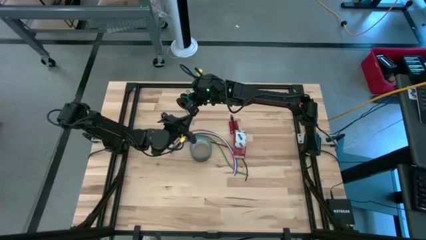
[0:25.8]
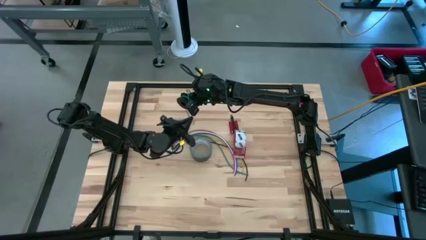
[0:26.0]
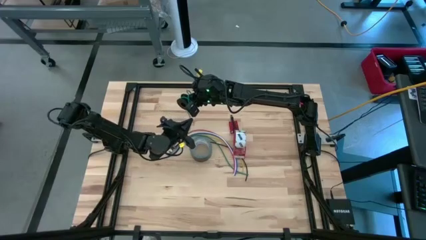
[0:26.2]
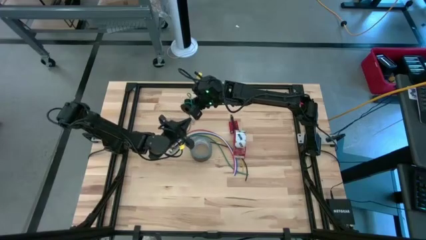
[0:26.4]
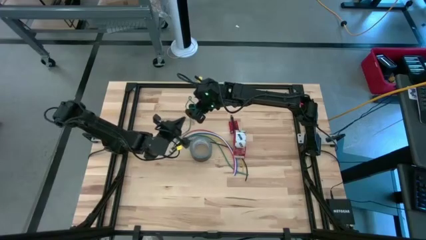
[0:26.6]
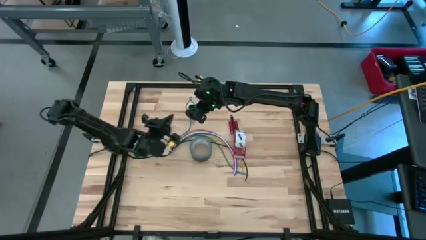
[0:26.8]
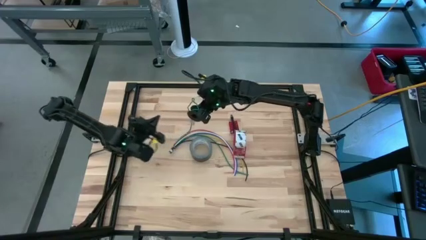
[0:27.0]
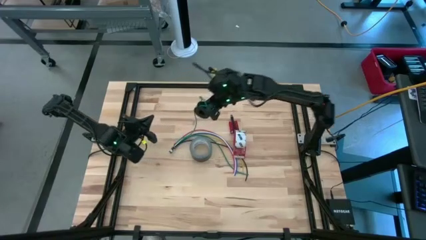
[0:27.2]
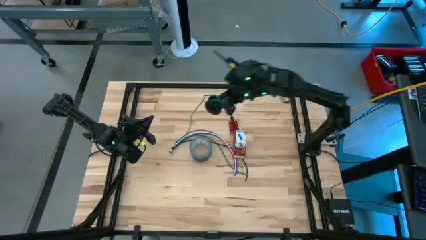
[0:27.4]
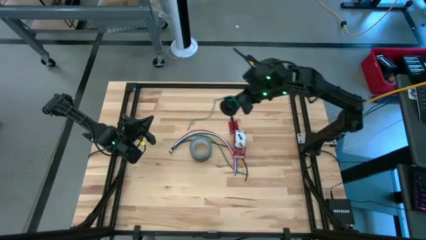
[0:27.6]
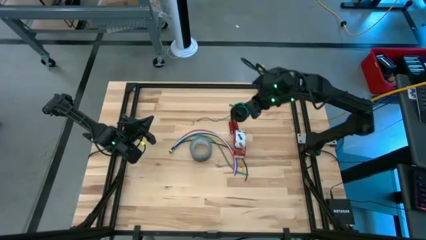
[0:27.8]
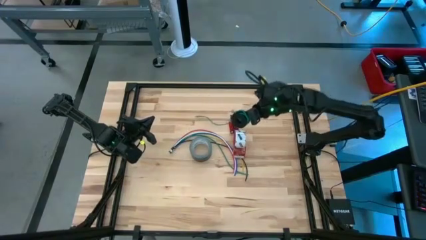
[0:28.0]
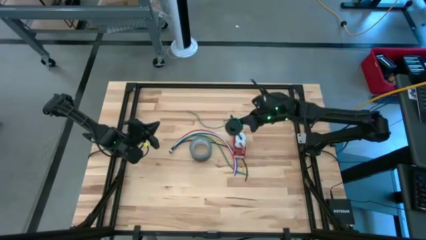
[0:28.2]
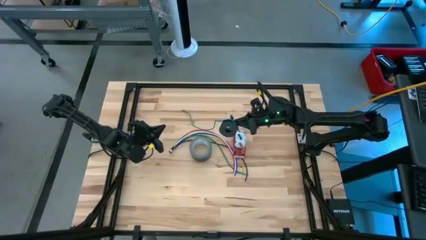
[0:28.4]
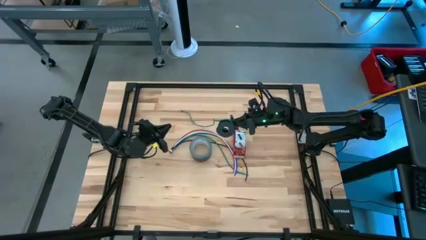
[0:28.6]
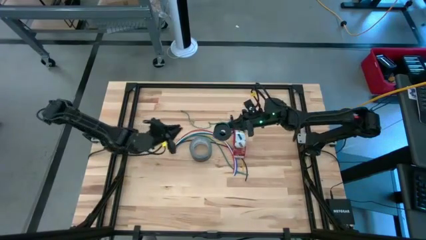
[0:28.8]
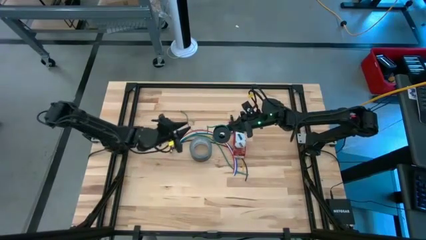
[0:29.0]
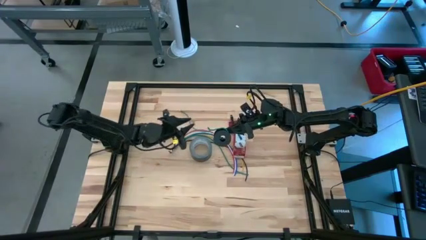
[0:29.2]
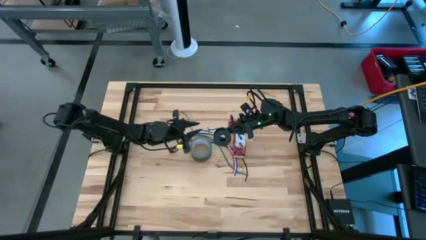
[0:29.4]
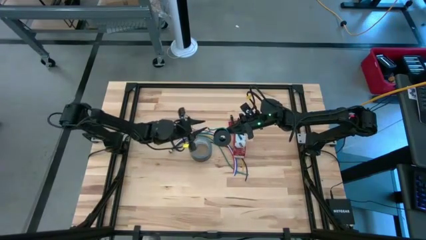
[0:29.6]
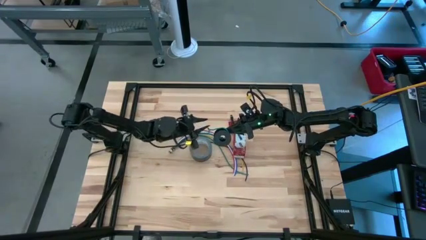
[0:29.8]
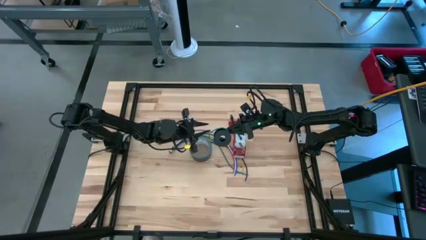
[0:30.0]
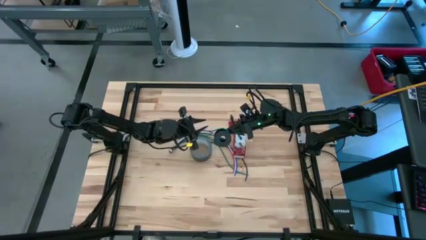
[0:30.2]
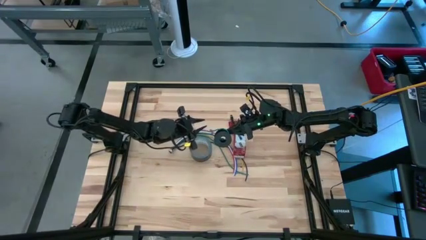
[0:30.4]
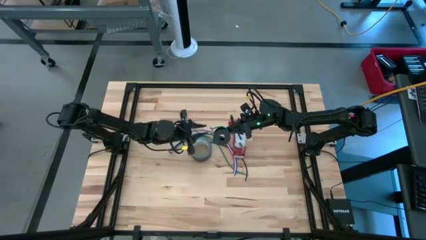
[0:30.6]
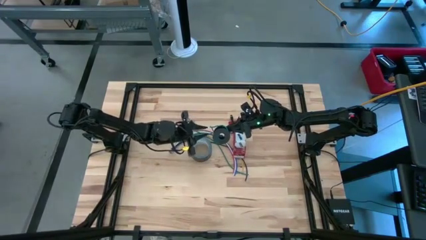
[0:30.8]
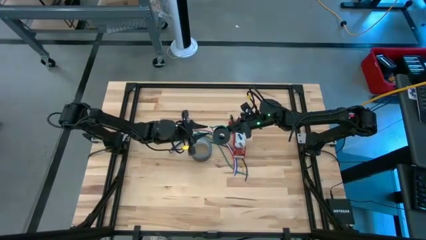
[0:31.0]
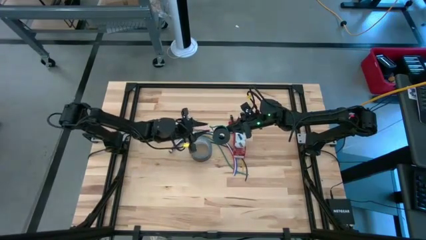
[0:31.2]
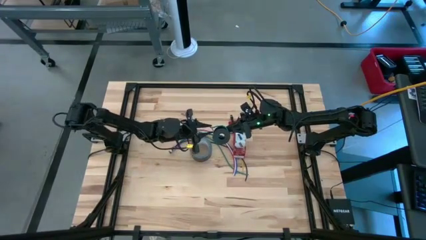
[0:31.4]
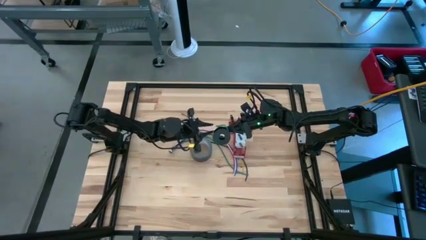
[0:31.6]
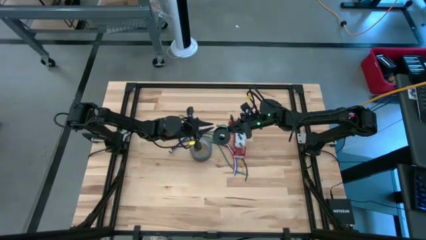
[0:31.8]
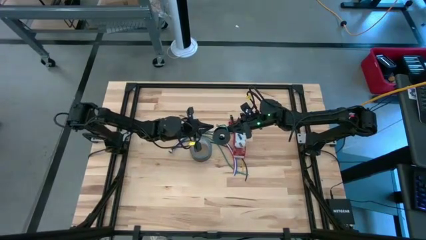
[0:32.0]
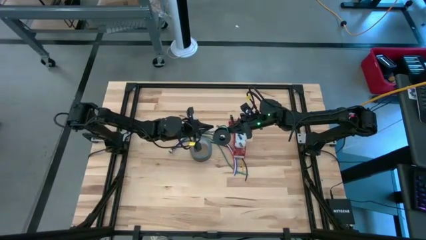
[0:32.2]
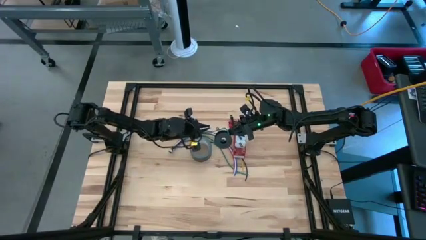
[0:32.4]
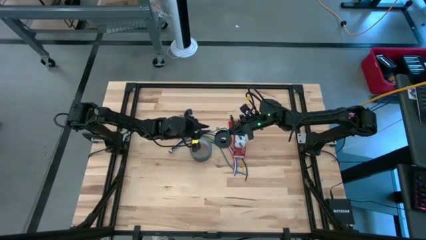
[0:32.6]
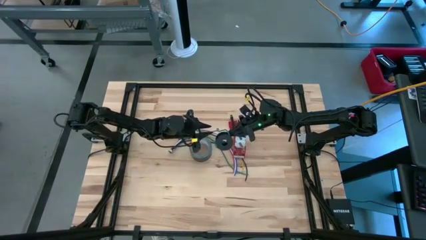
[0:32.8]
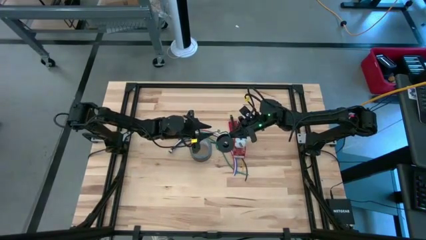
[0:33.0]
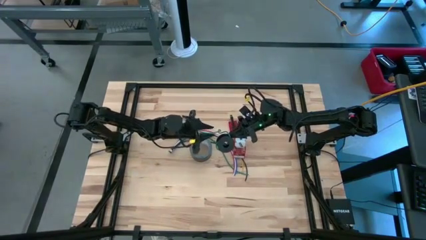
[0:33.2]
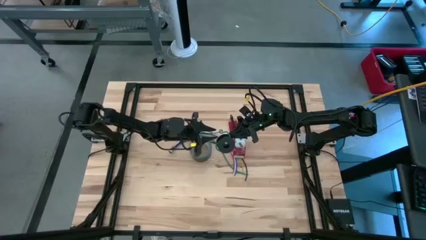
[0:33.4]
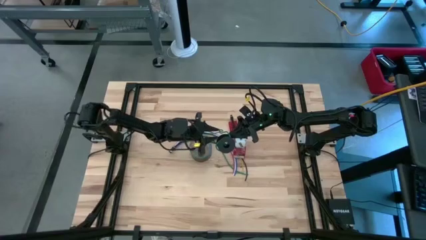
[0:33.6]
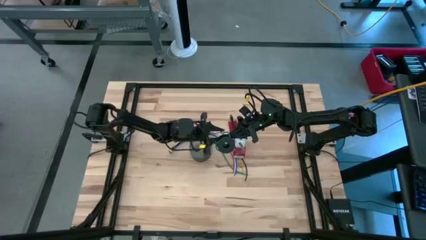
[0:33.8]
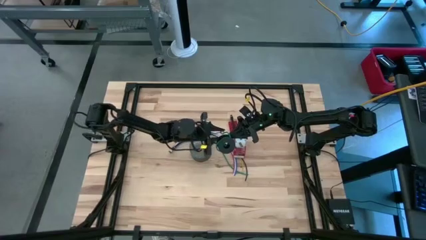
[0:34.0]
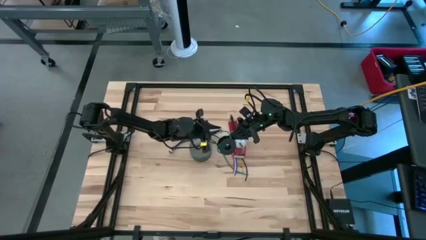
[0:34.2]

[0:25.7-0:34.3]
Task: Coil cords
Uncoil the green wire from the black spool

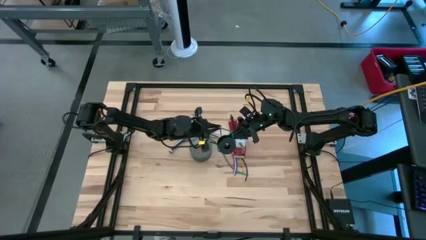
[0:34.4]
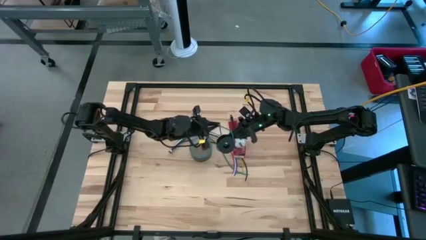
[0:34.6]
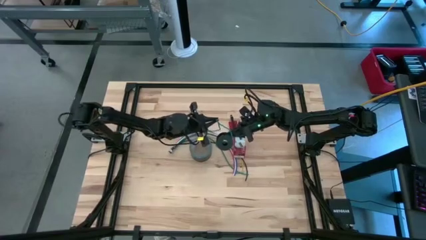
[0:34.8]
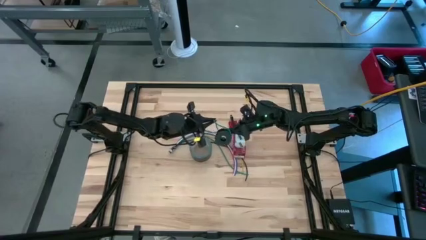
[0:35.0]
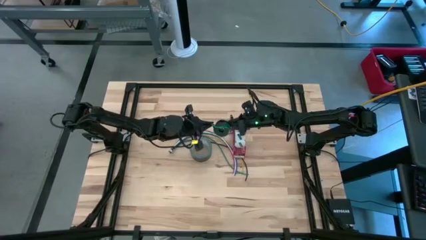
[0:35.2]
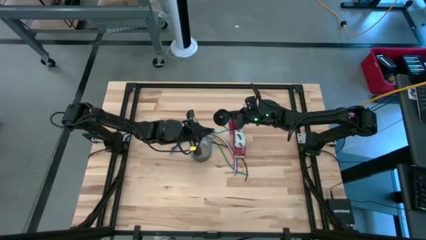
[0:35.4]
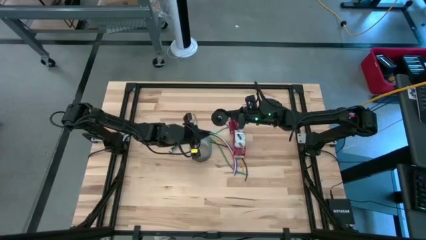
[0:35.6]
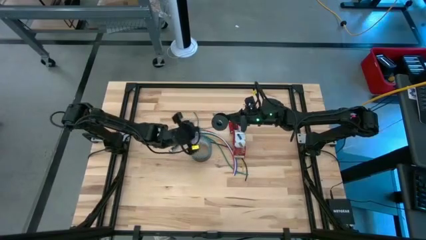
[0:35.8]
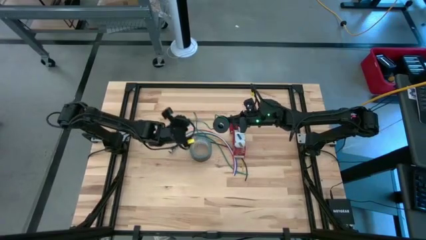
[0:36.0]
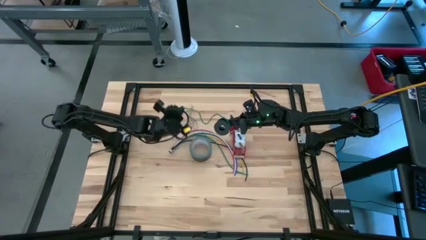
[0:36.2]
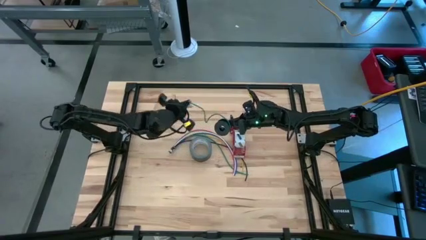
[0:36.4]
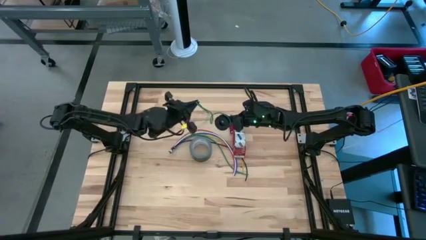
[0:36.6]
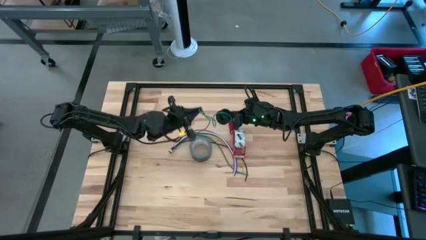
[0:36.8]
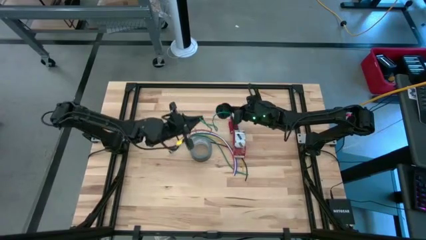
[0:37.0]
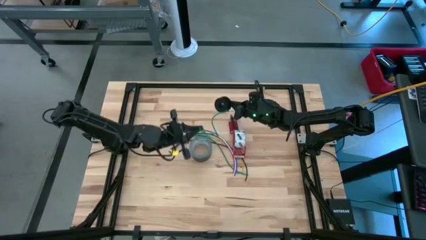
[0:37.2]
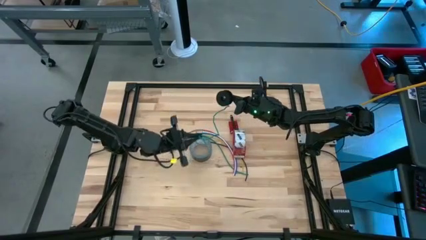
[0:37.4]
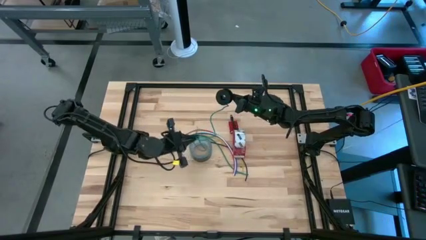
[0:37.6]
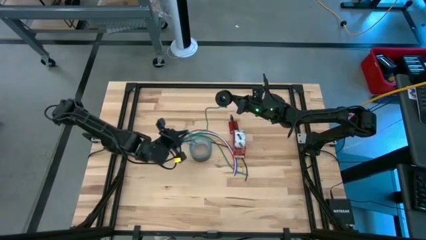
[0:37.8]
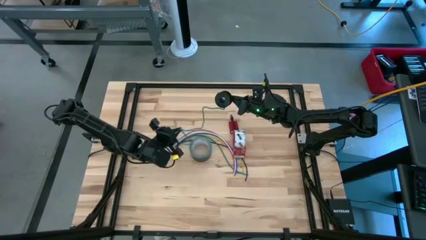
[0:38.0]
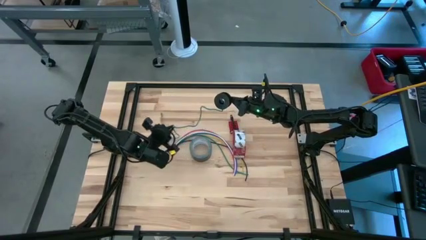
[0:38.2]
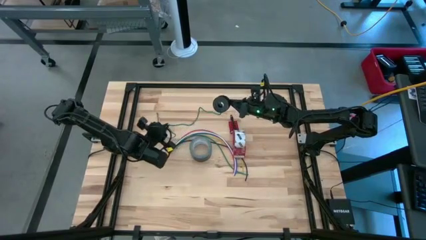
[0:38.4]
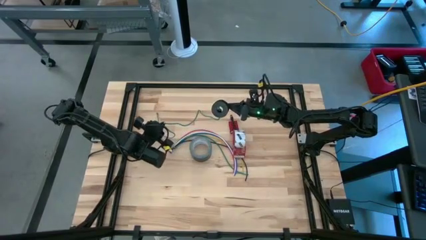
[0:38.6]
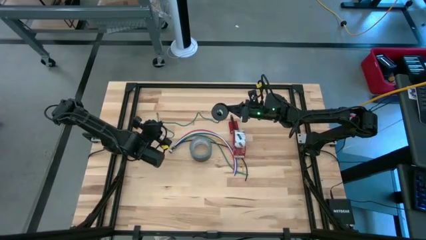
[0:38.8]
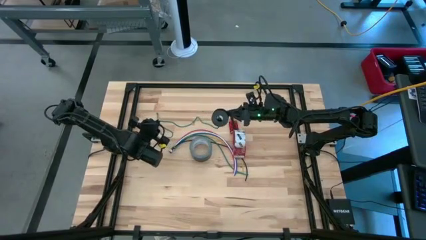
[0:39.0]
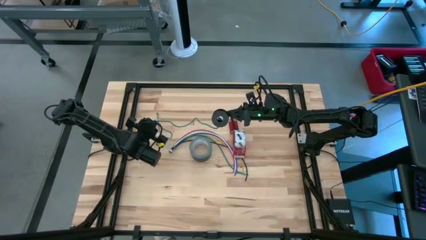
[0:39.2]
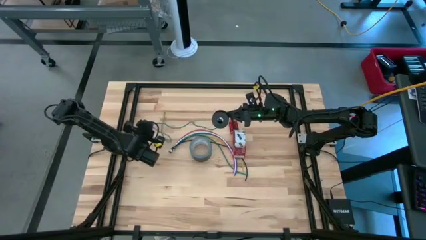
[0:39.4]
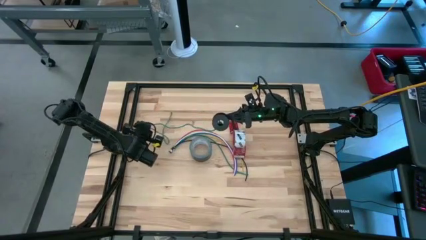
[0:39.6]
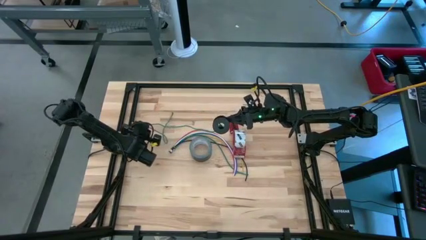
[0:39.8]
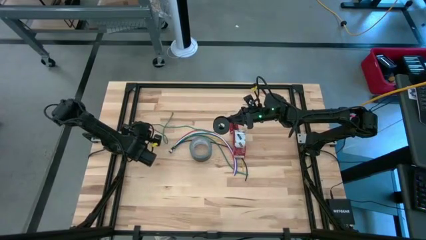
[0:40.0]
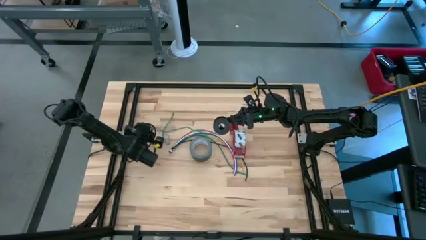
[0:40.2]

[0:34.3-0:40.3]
Uncoil the green wire from the black spool
